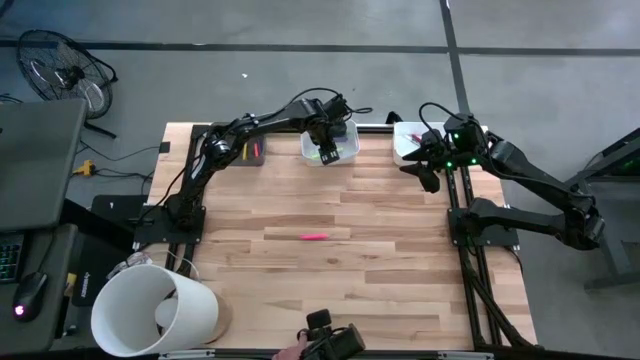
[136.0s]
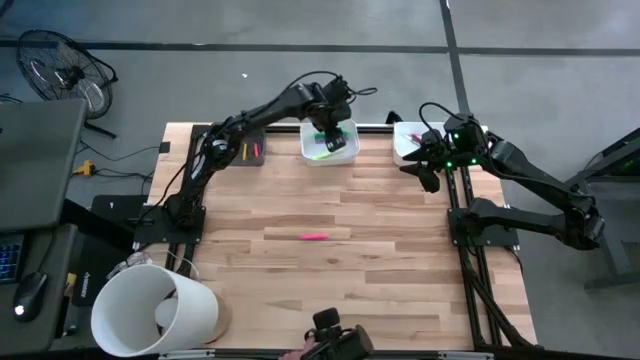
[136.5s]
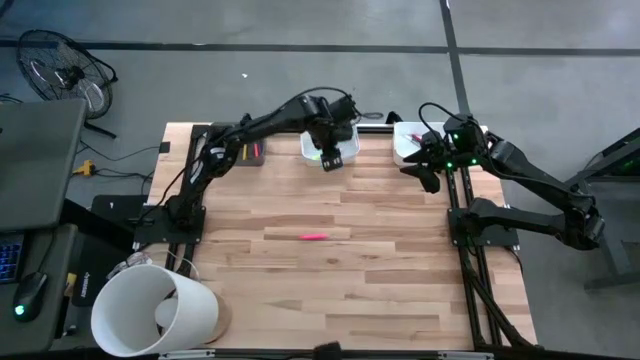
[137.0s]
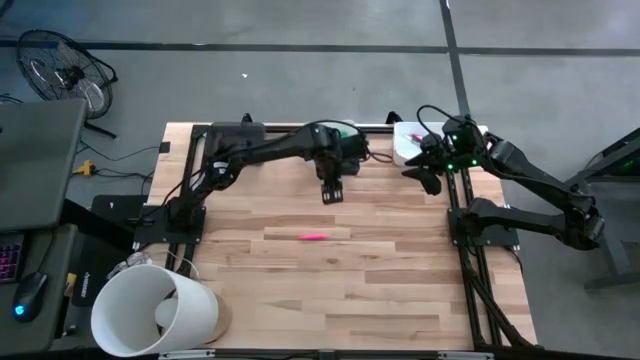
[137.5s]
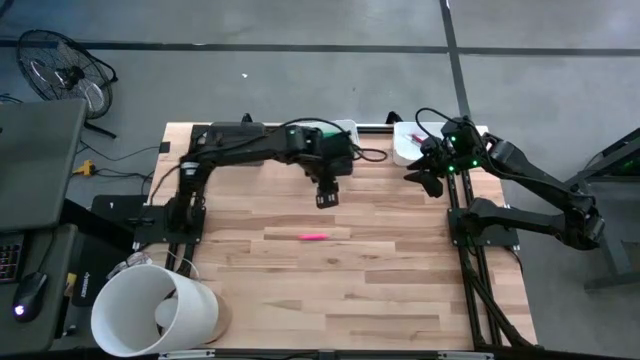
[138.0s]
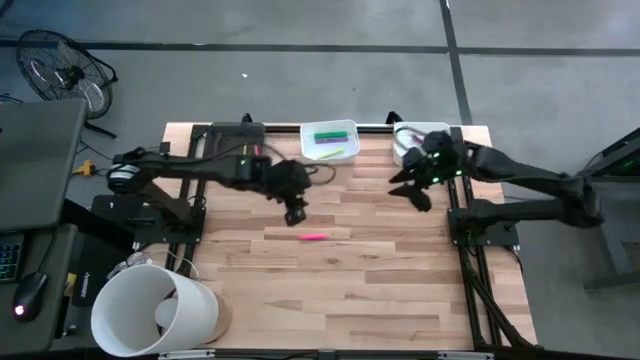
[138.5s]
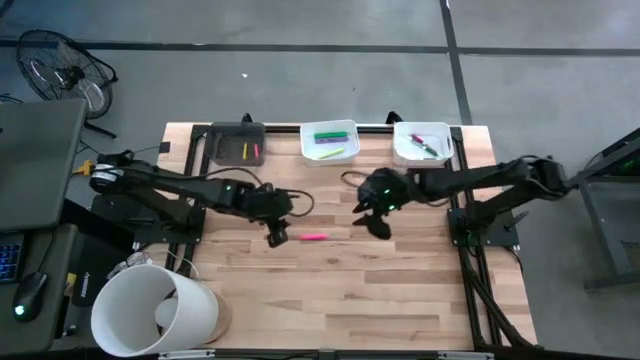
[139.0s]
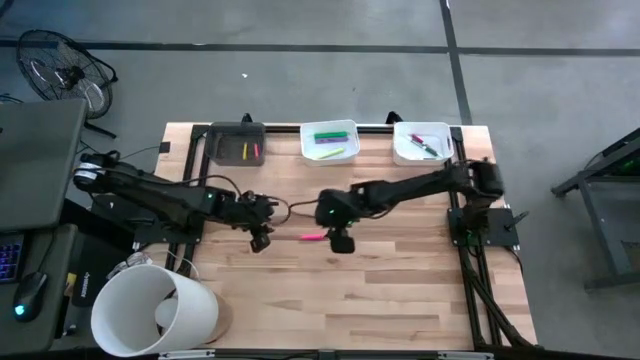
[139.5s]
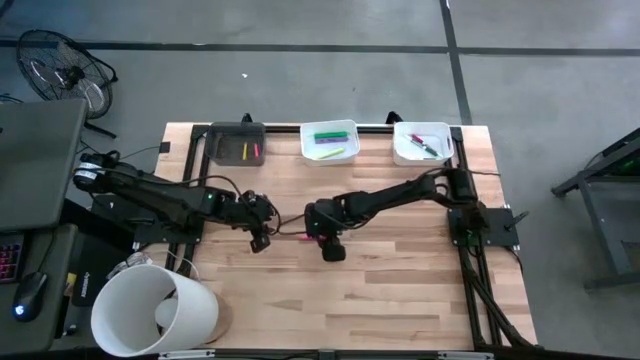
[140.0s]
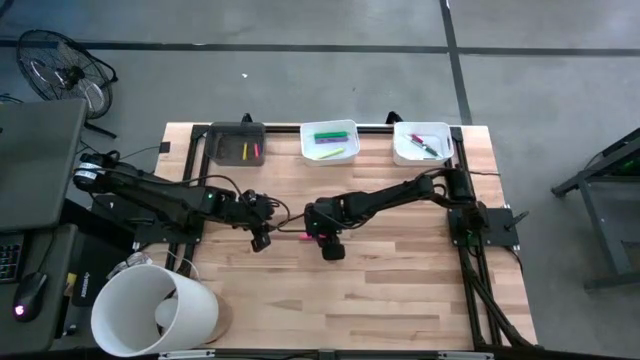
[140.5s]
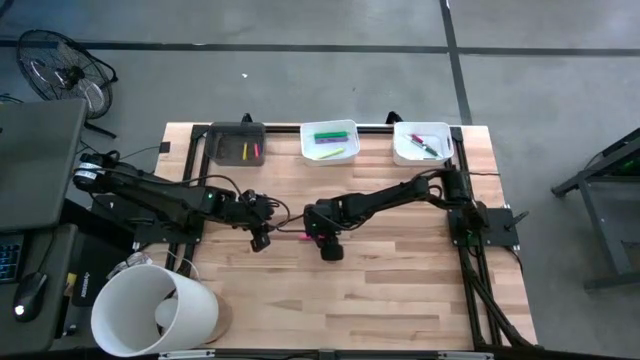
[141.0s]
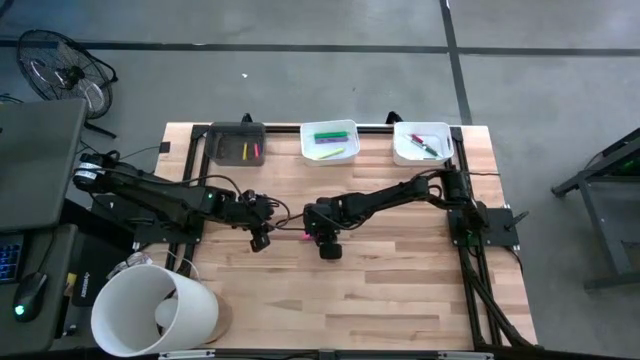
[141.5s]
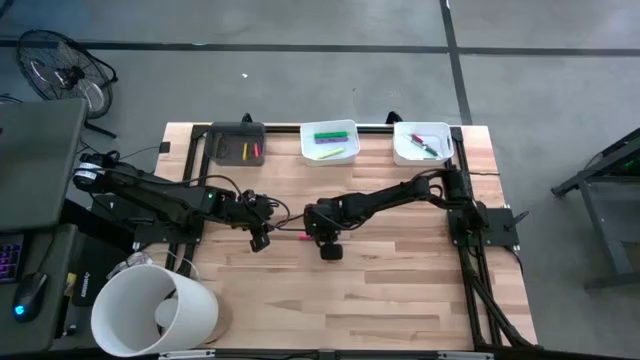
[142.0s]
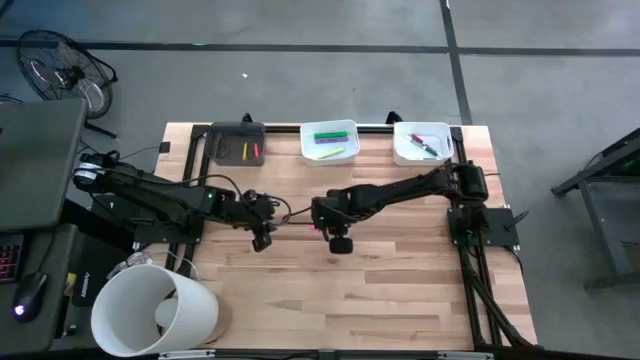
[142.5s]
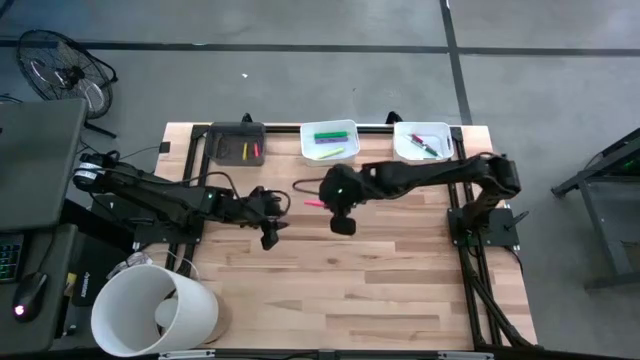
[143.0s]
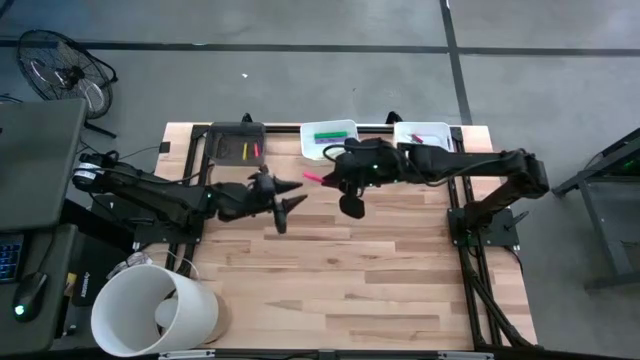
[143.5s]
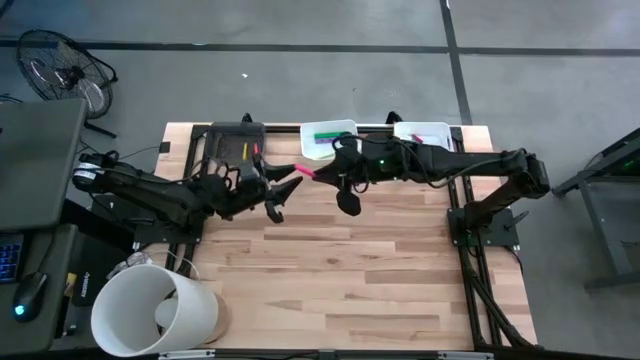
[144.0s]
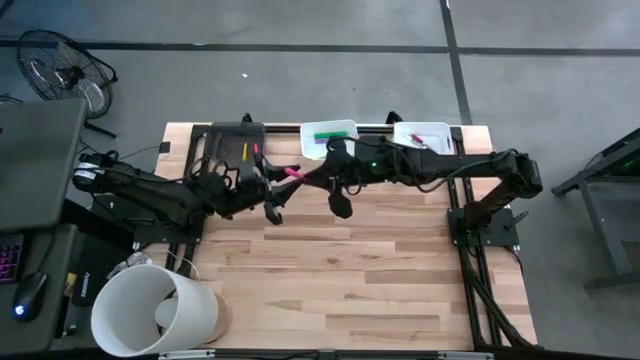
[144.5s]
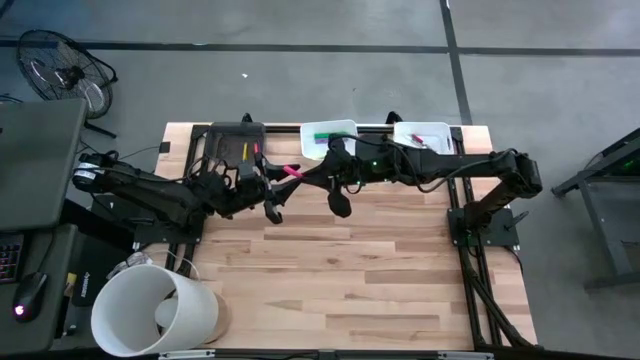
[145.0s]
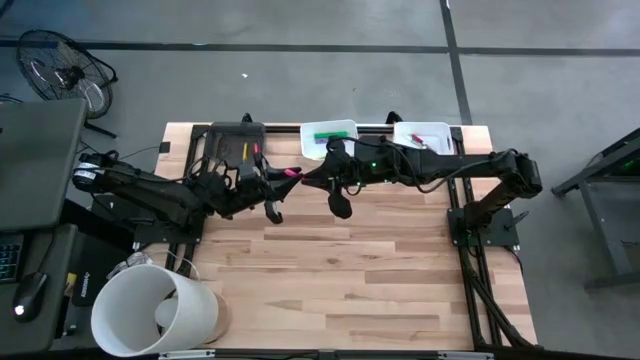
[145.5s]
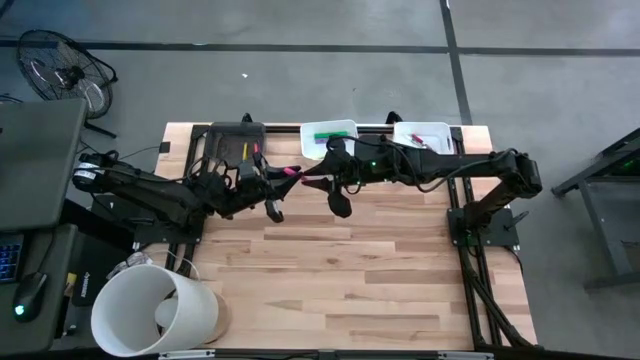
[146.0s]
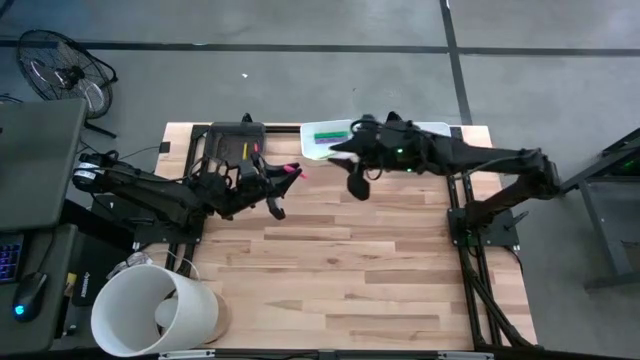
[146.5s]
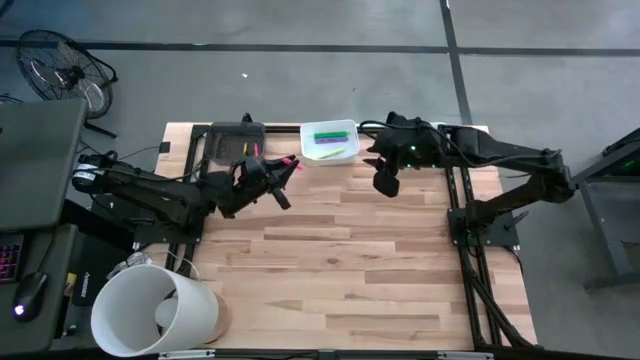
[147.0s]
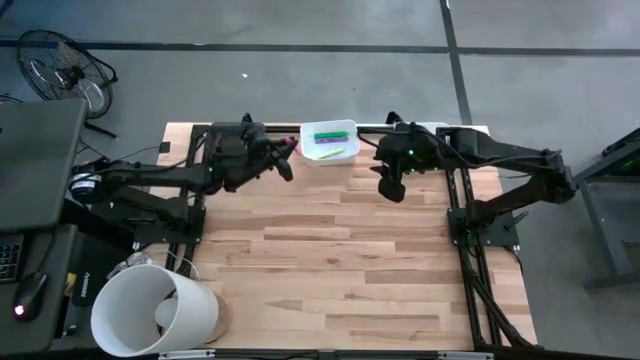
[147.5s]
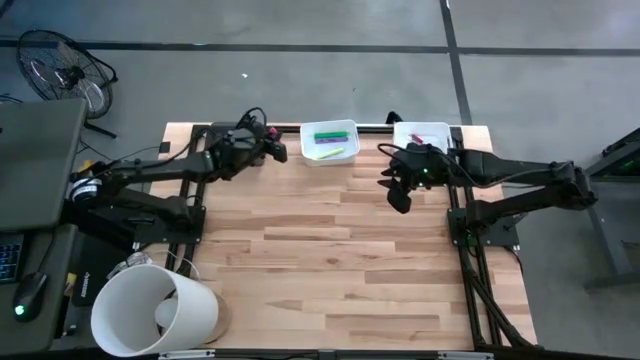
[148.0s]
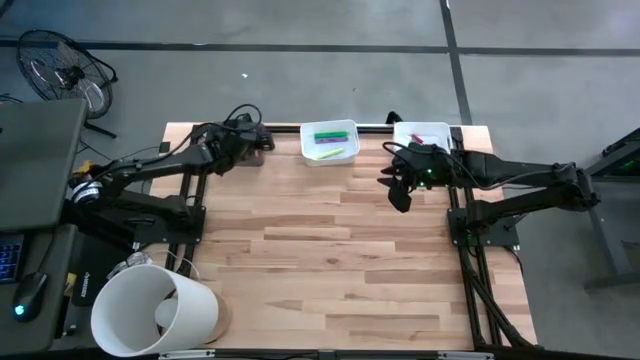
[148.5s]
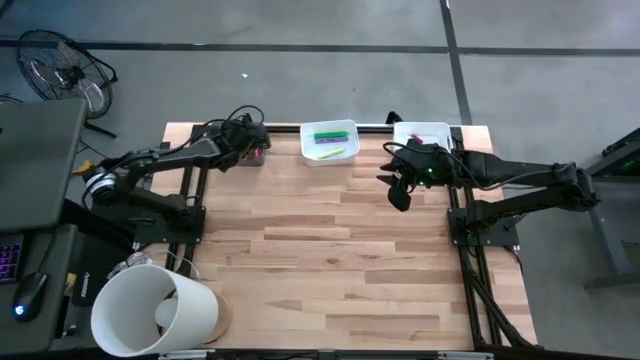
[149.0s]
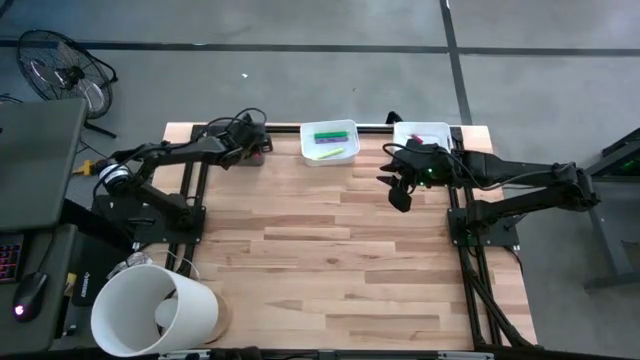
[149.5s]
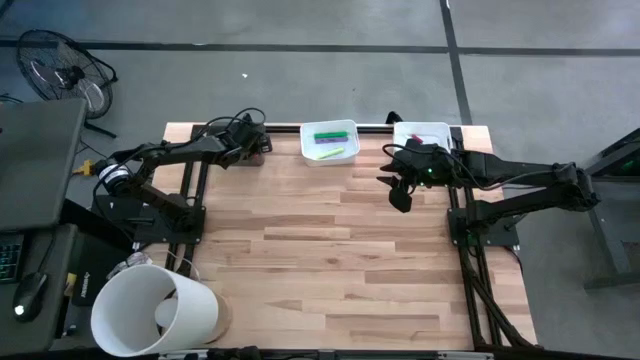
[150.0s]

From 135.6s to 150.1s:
Task: Pick & Place Markers
Put the pink pen into the black bin

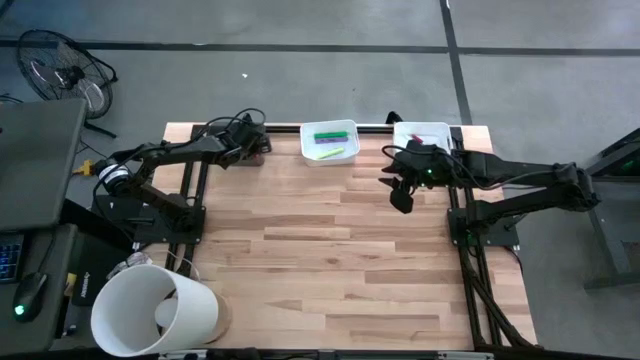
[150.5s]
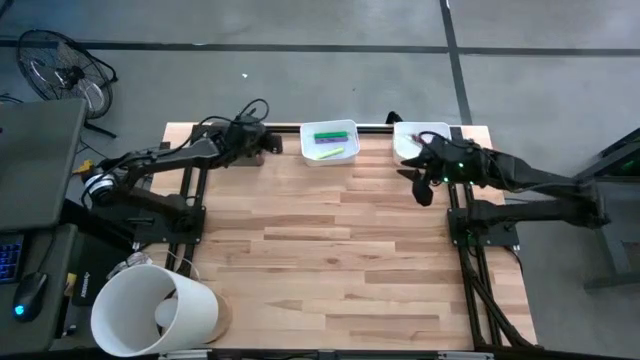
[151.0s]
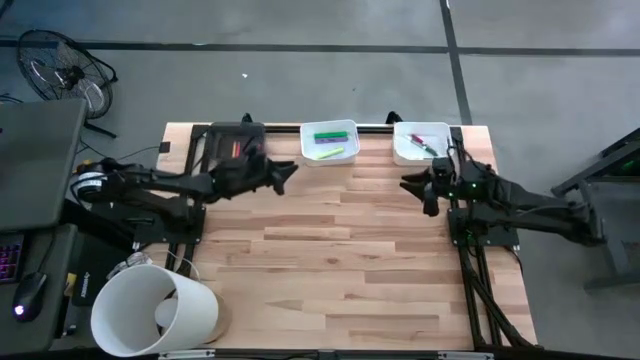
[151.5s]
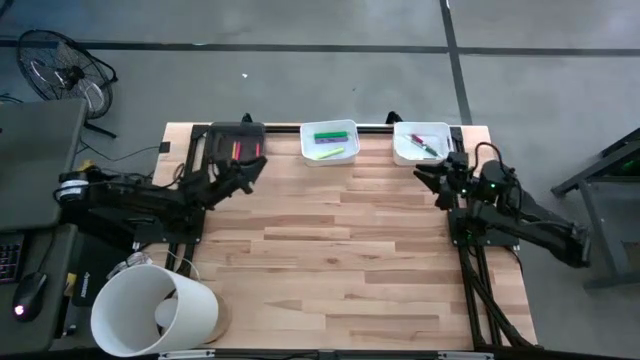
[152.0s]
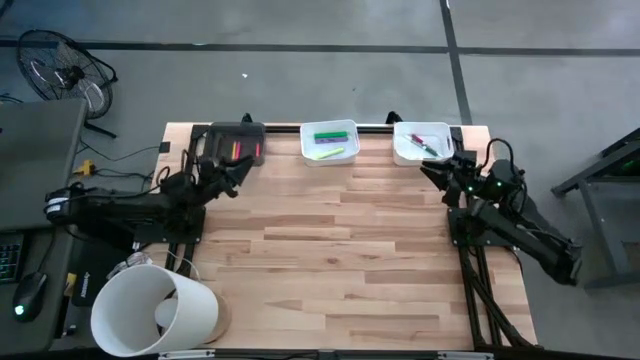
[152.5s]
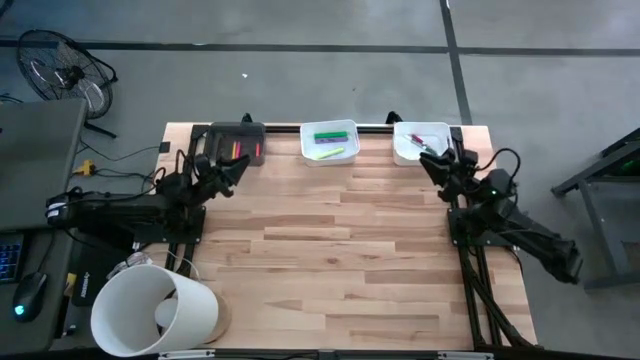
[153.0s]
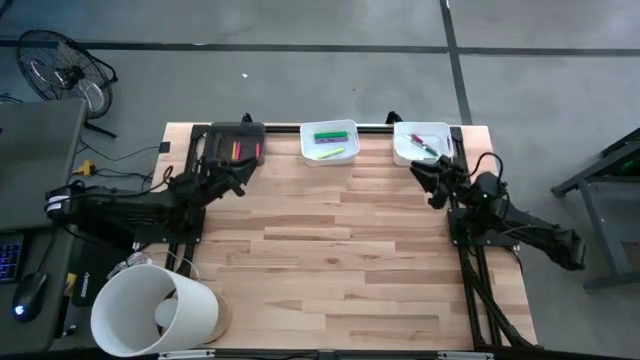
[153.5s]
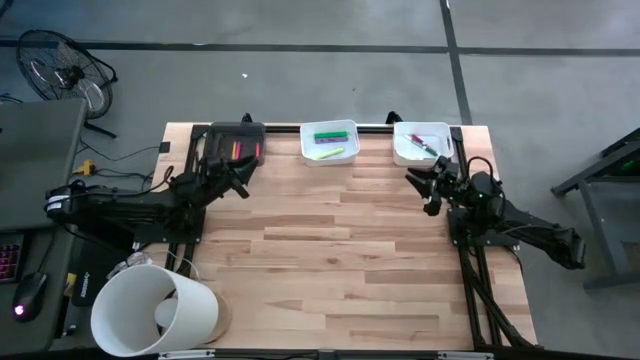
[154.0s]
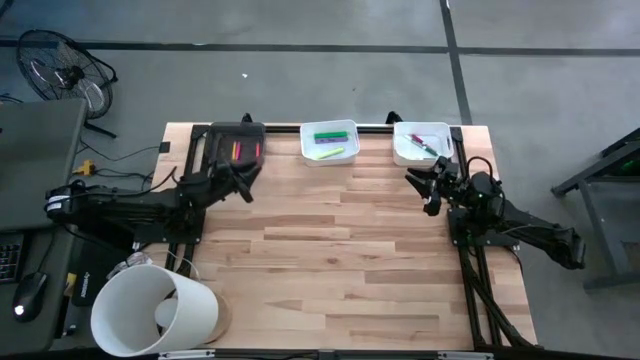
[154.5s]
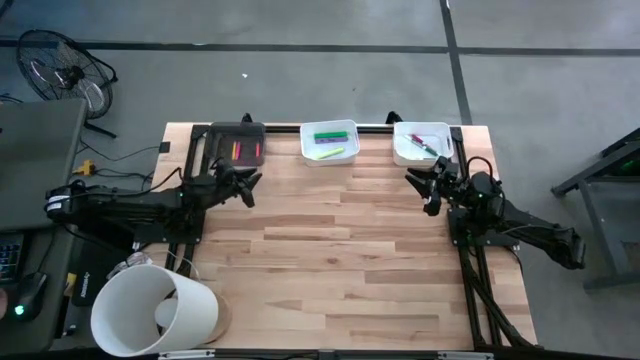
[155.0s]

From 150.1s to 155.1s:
Return to Home Position
